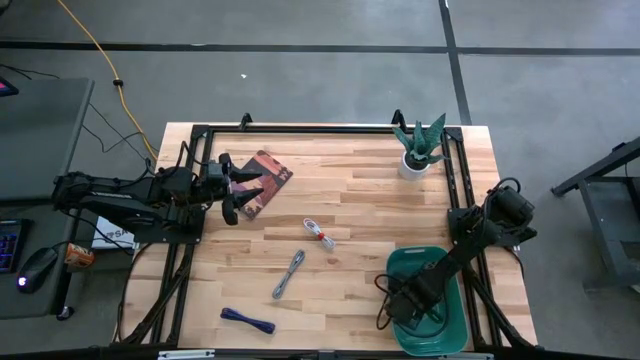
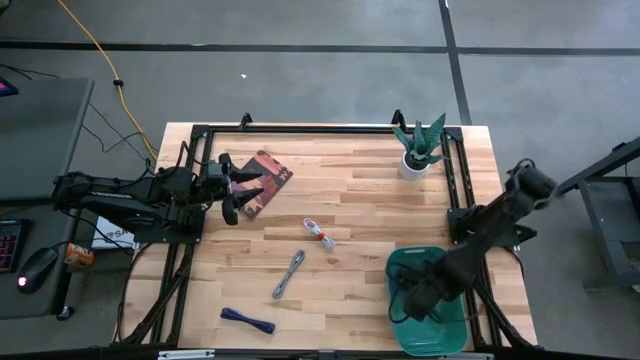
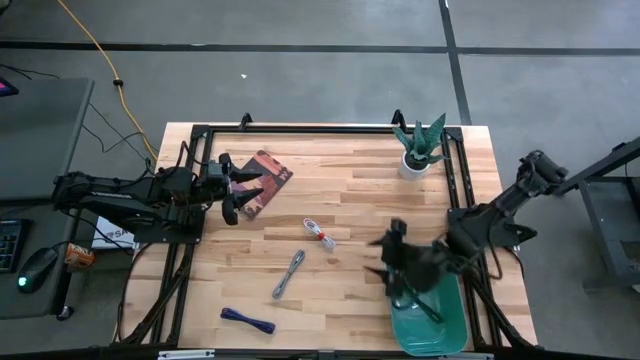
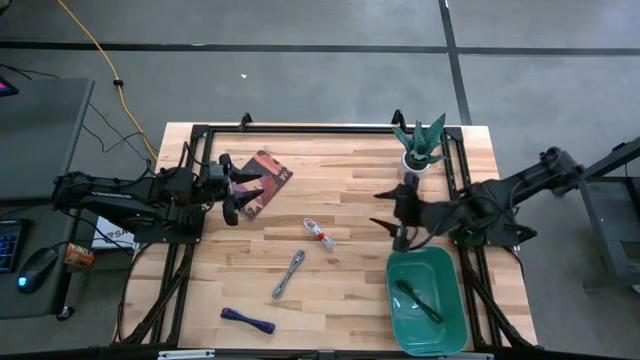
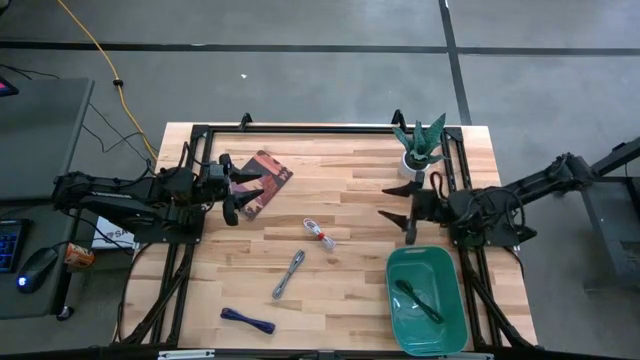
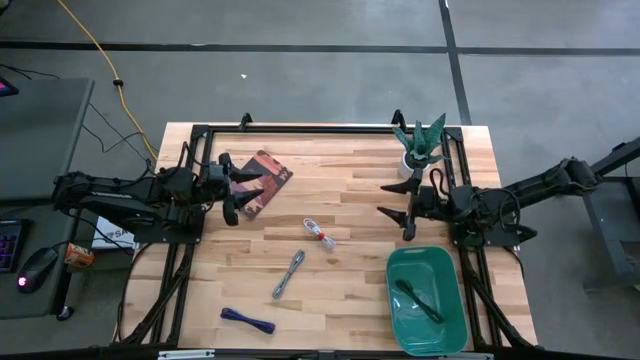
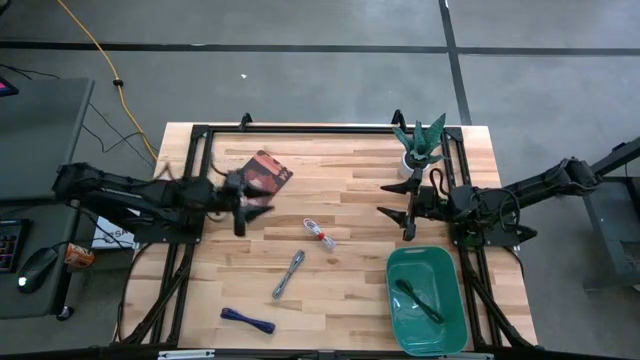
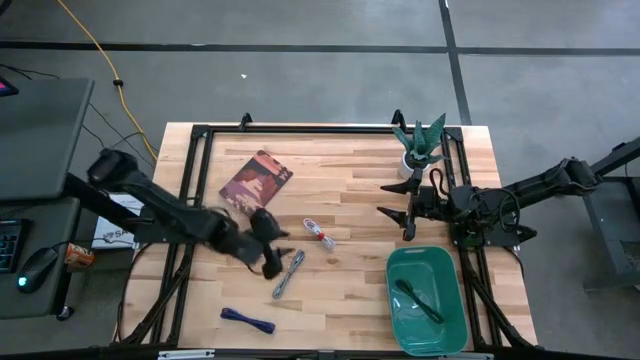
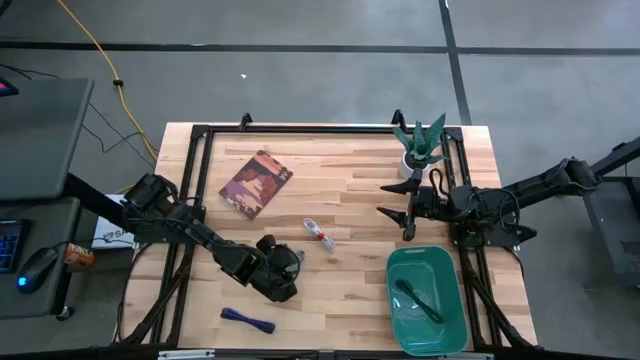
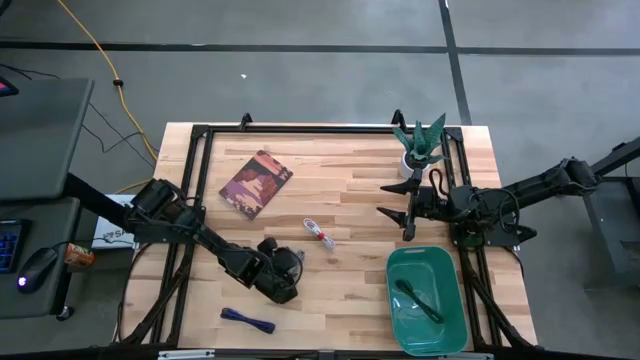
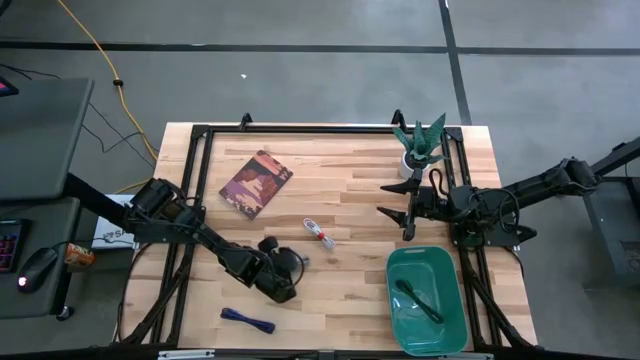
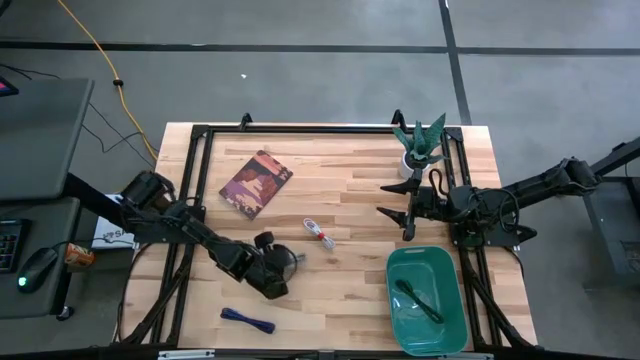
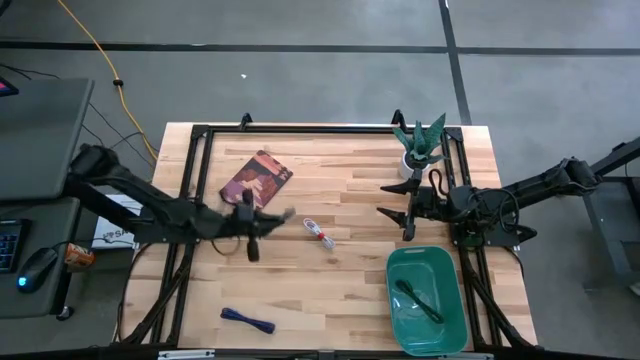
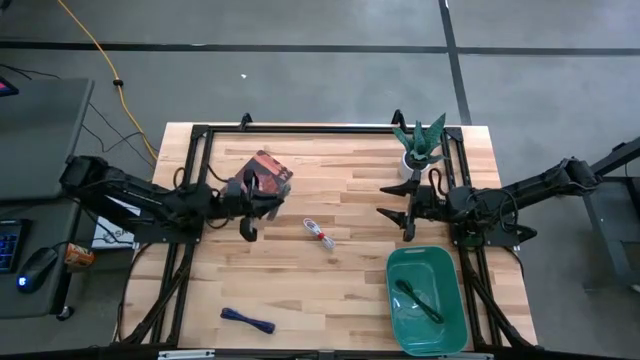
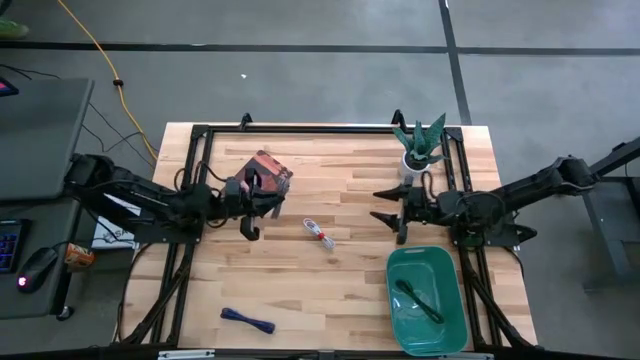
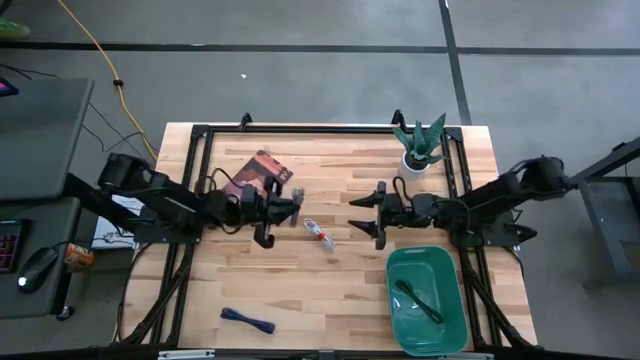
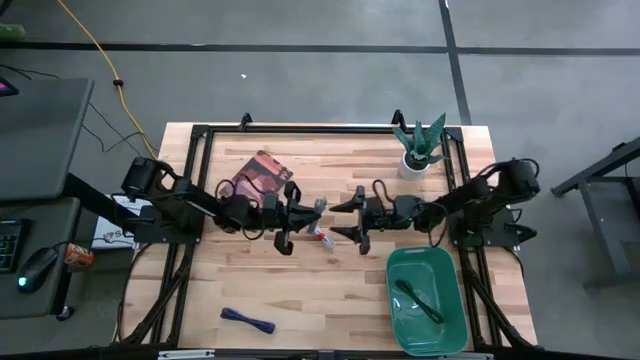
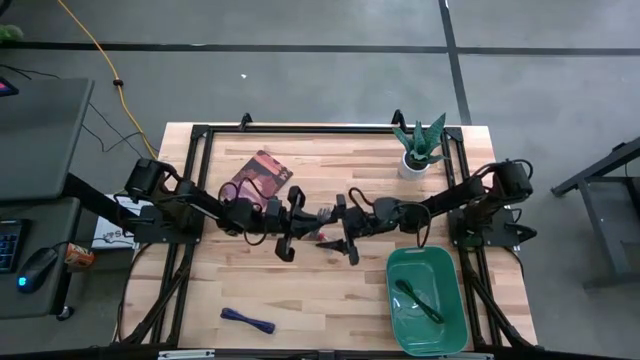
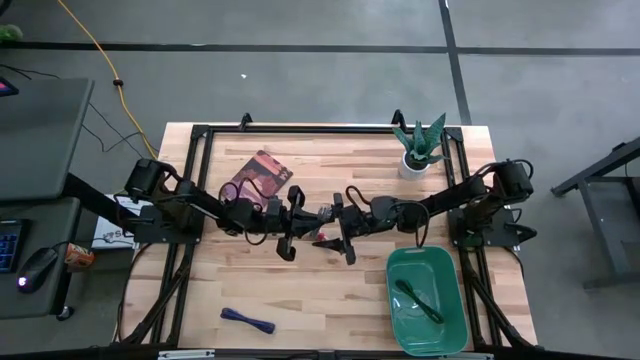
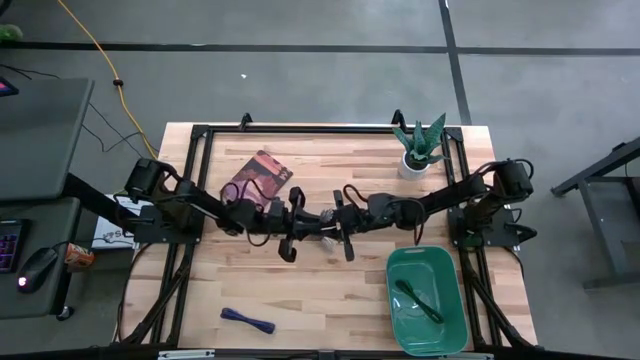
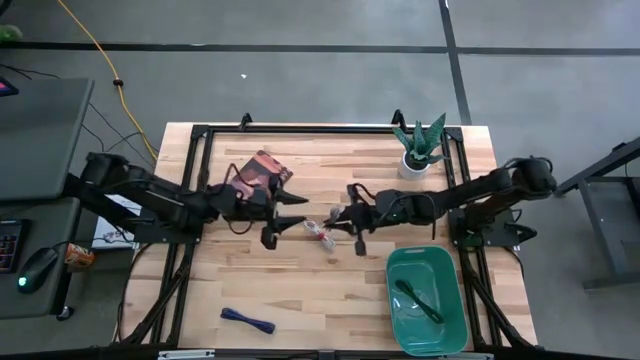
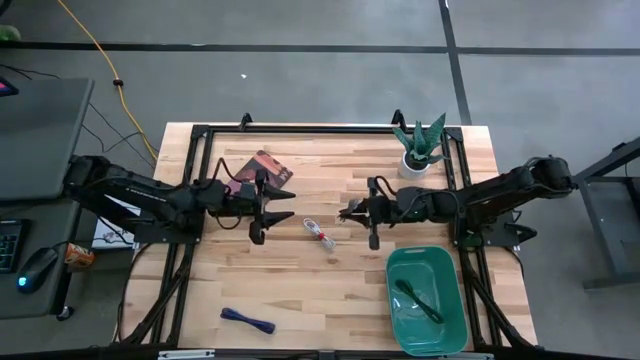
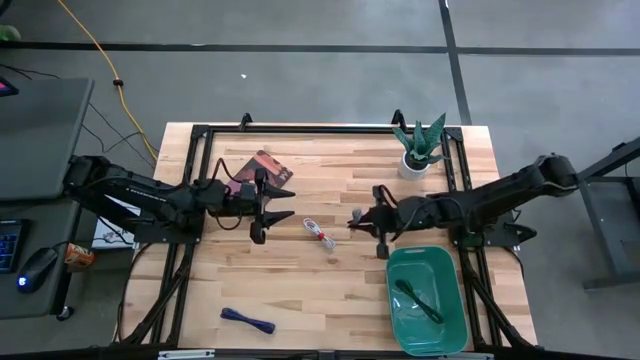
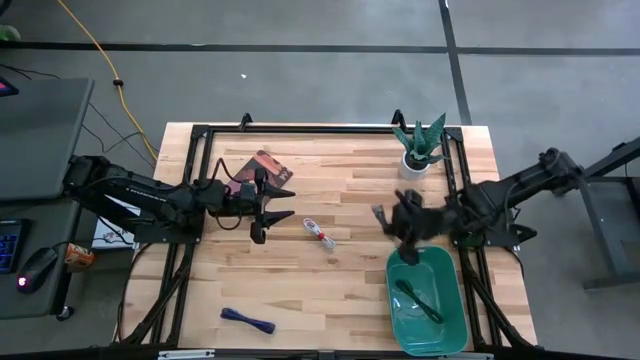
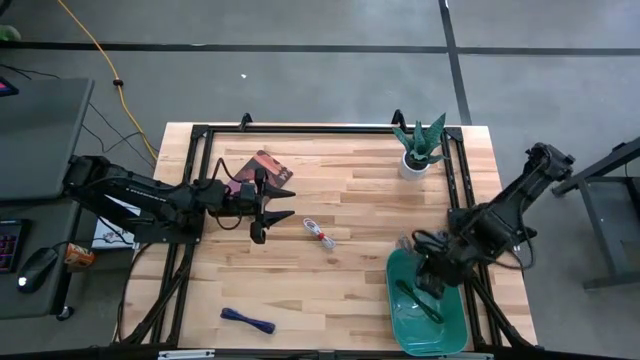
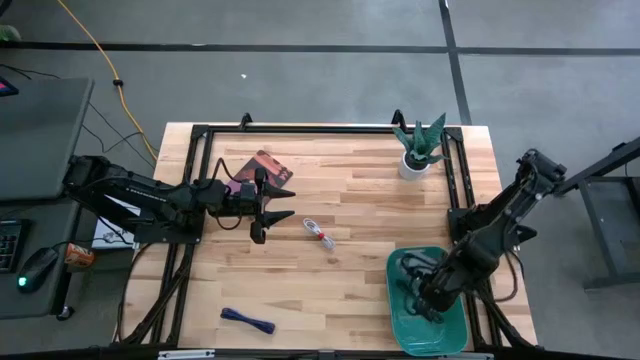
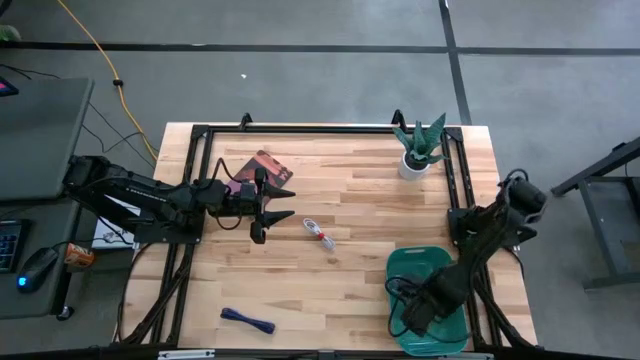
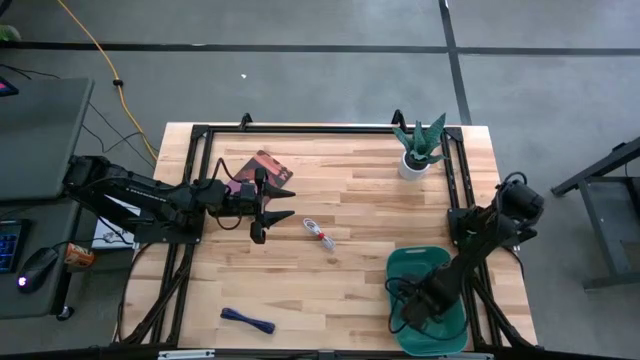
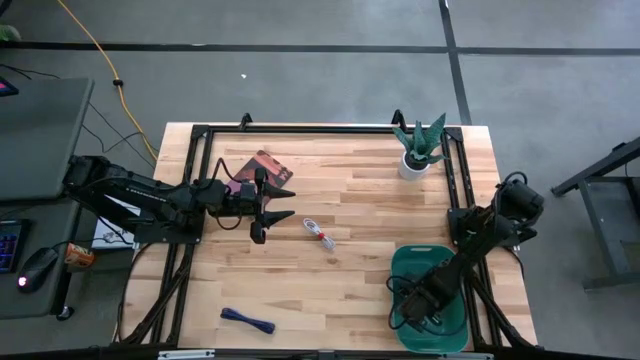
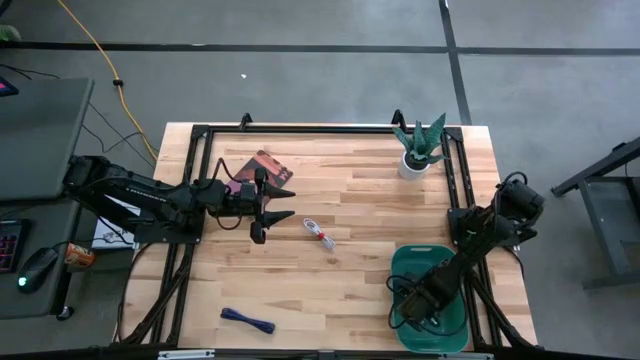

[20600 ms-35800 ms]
Task: Pick and place USB-C Cables
Put the black white USB cable into the bin

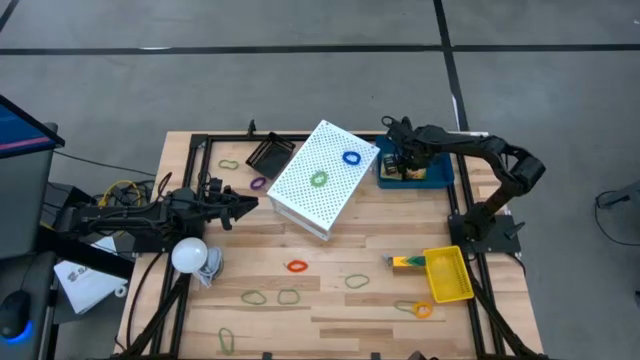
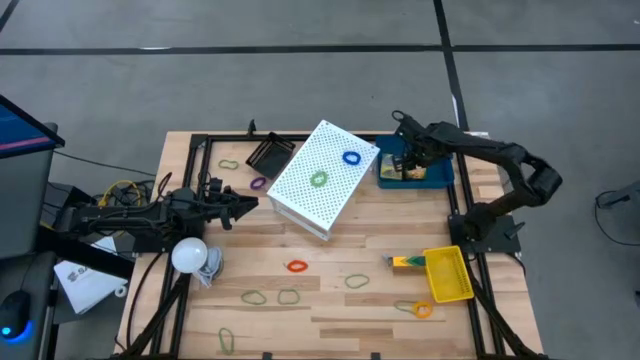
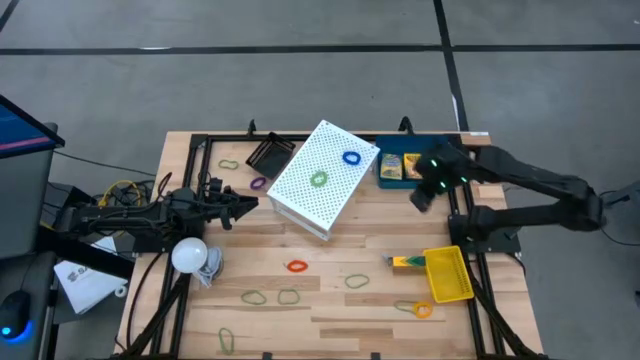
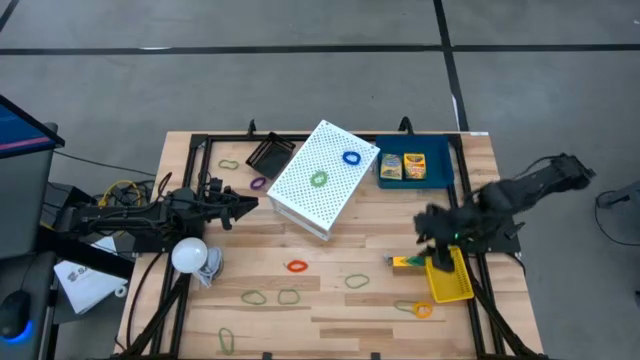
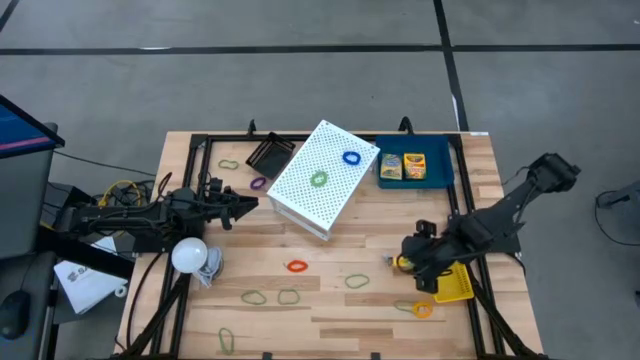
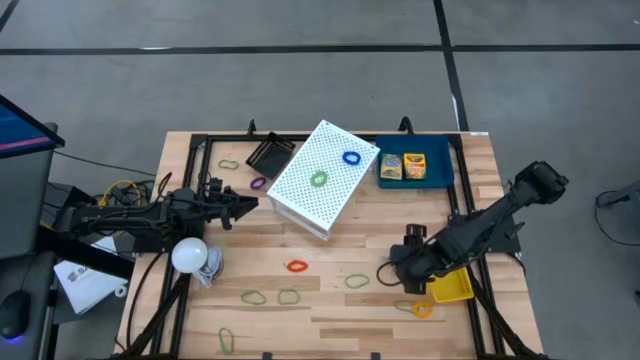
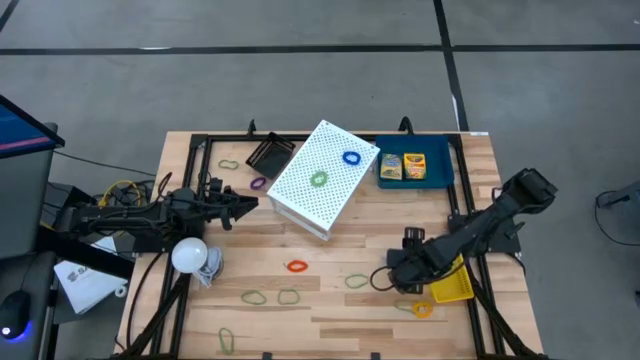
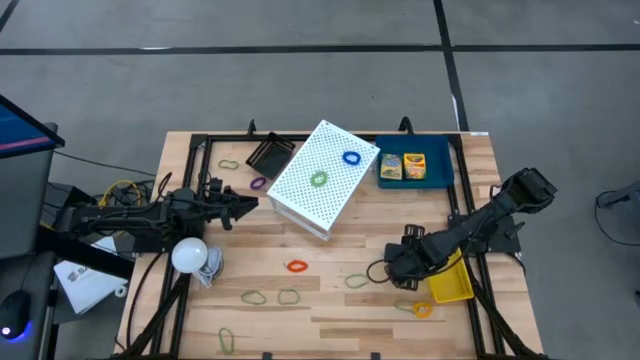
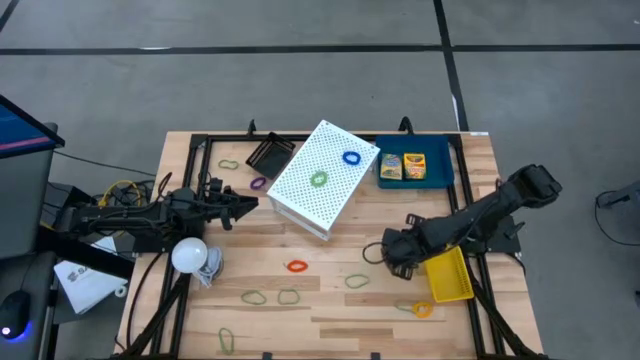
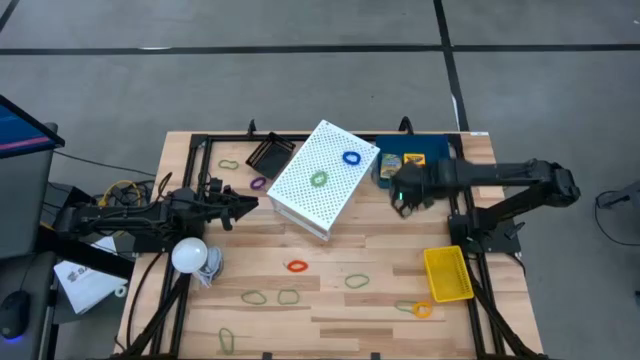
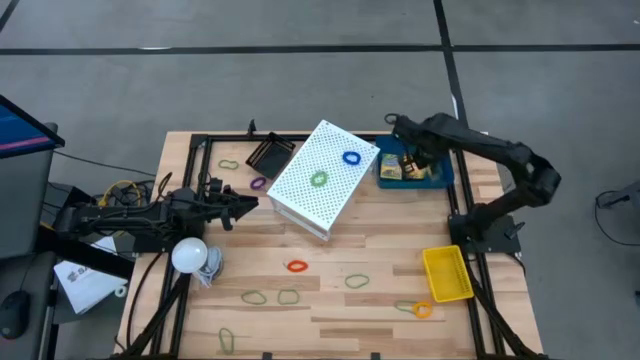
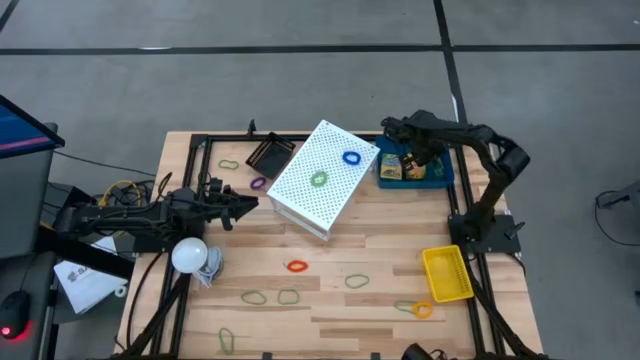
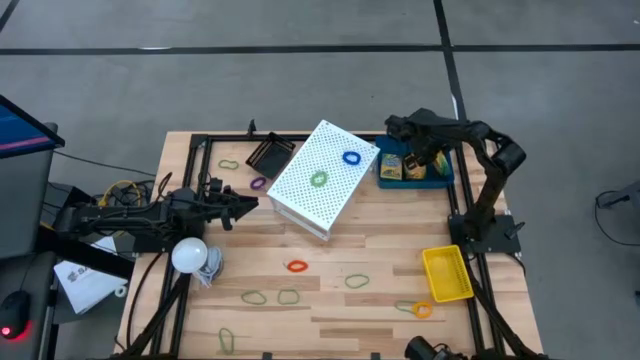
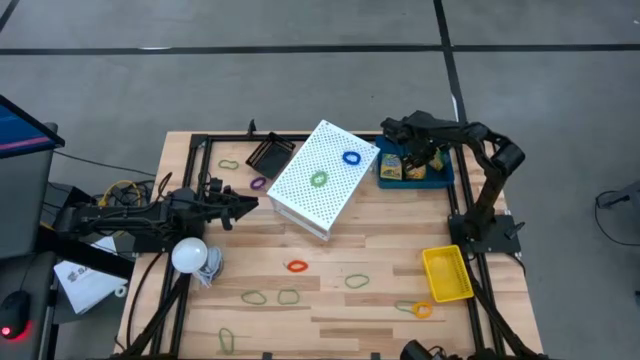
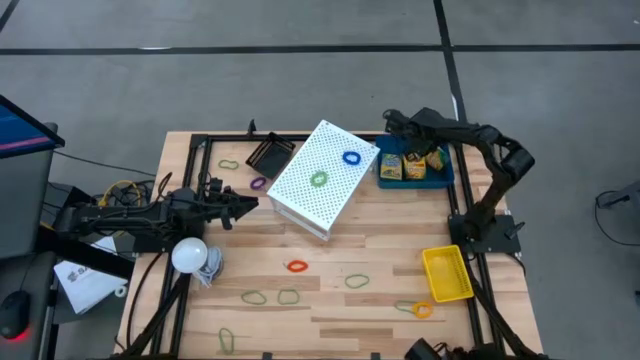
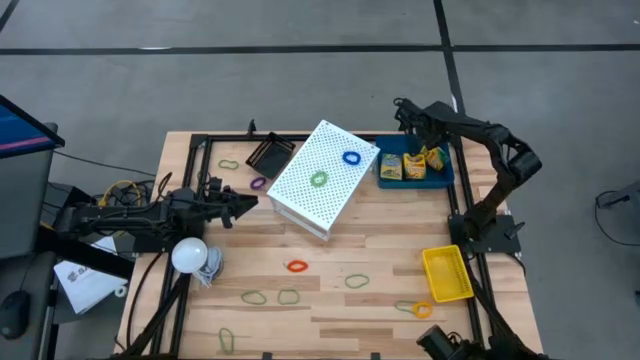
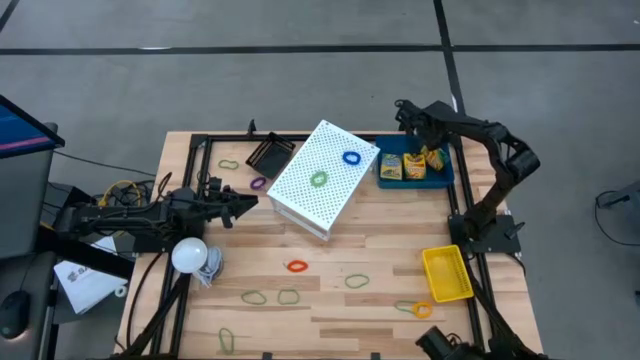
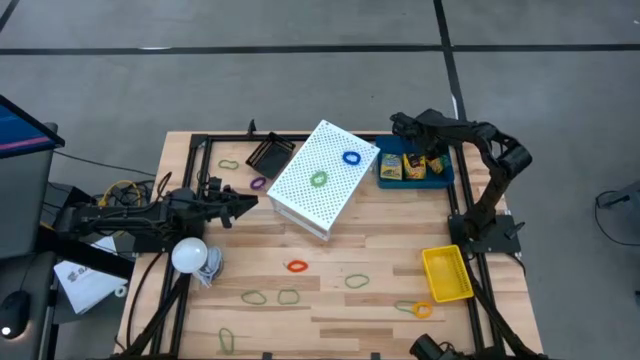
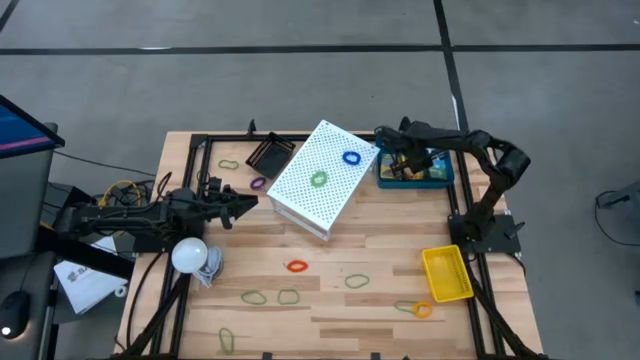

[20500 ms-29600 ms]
Task: Pick & Place Office Desk Supplies
Put the yellow box of crayon into the blue bin
